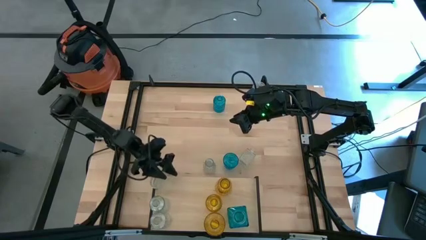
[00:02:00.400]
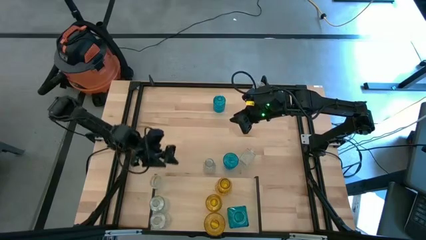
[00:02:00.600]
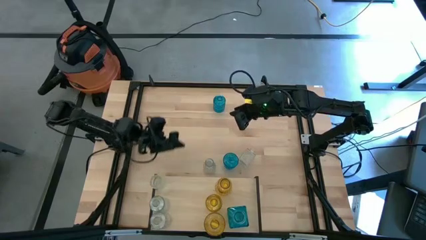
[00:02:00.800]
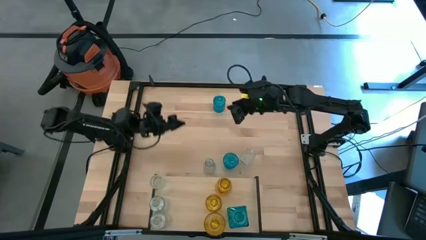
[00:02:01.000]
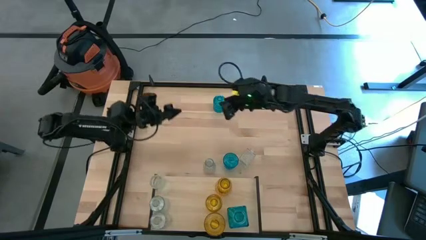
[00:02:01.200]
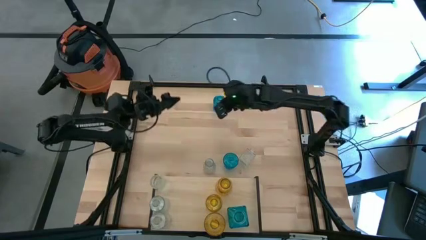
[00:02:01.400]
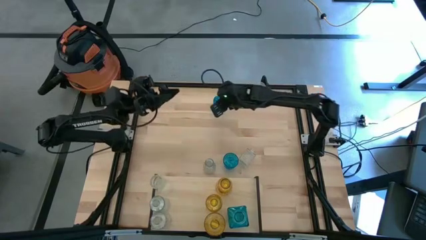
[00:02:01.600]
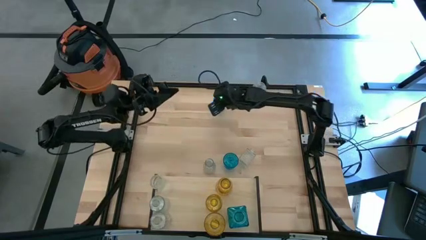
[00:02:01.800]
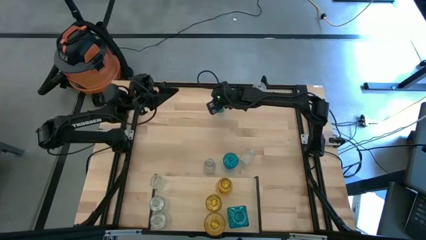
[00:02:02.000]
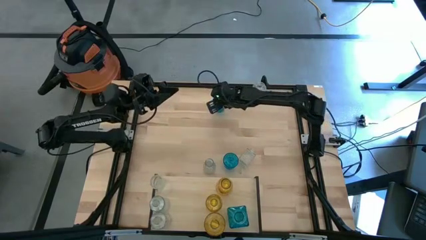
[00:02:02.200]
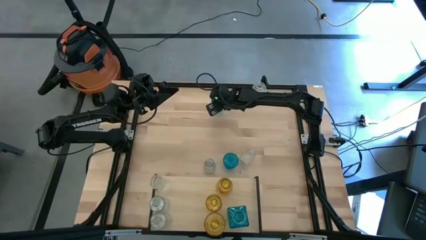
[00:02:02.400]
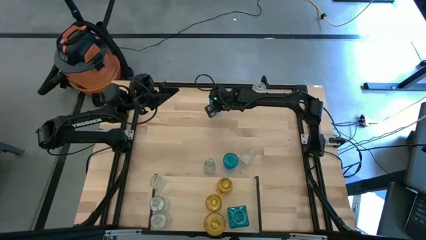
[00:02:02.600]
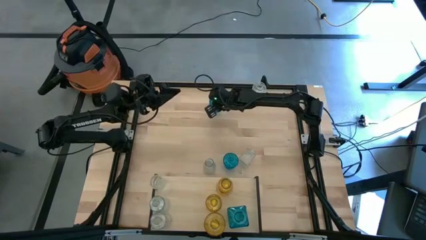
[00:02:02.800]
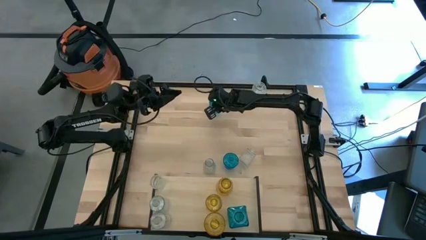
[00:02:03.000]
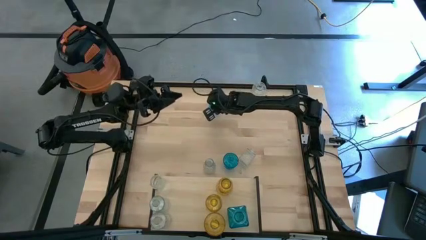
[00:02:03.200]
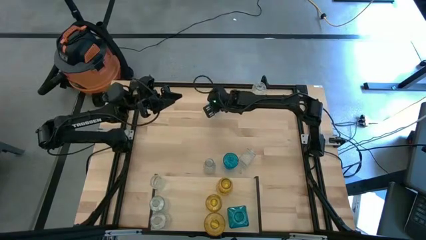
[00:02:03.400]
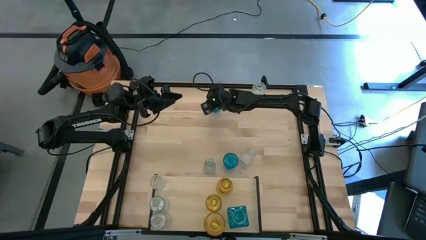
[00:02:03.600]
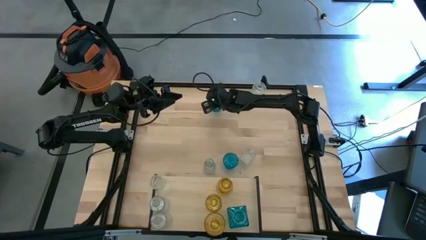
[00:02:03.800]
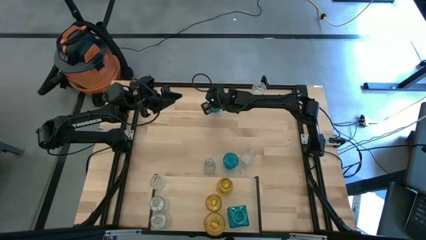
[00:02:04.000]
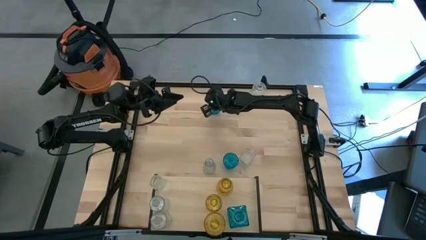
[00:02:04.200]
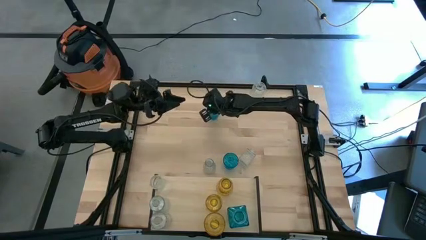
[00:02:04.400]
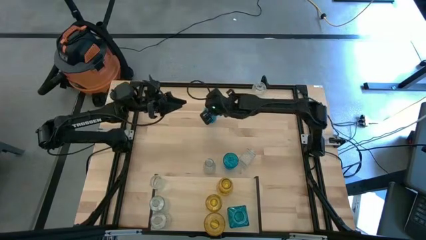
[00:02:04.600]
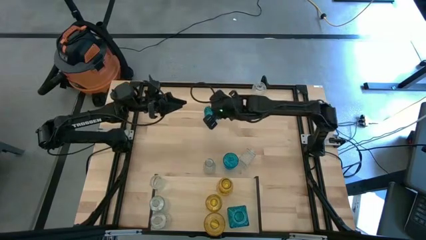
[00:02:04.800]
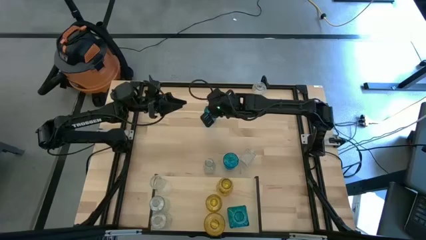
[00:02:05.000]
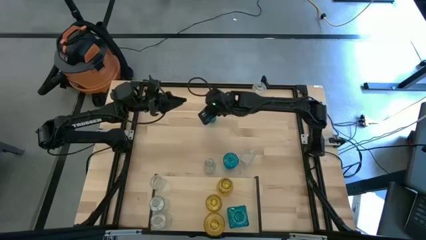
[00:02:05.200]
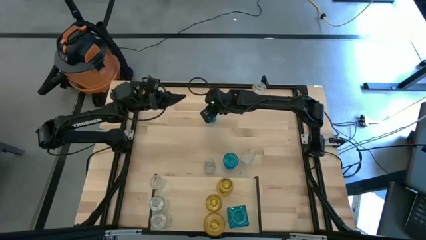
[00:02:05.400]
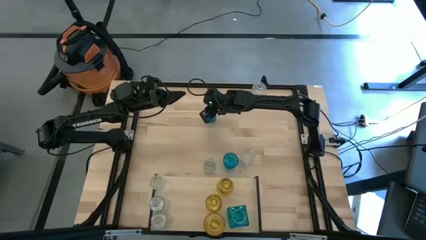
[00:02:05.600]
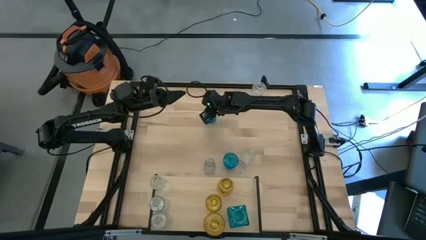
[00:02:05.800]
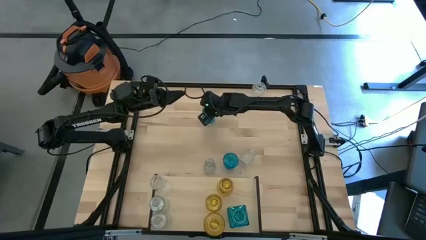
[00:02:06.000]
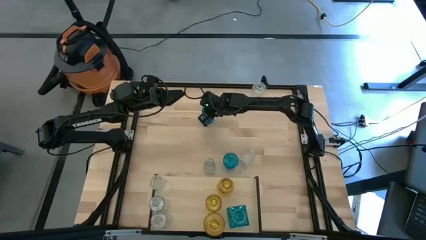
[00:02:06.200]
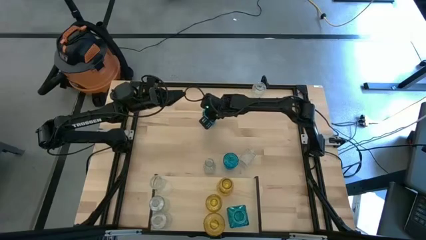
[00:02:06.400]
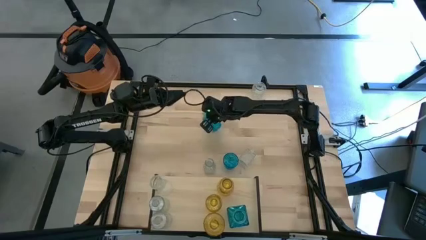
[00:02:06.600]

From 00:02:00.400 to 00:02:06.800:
Task: sort vases onto shelf
Put the blue vase on the shelf

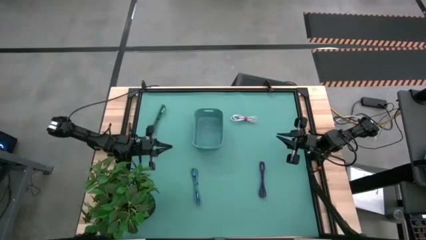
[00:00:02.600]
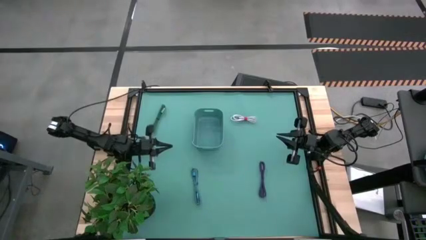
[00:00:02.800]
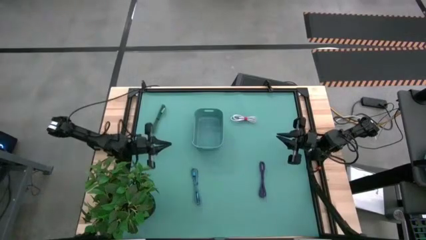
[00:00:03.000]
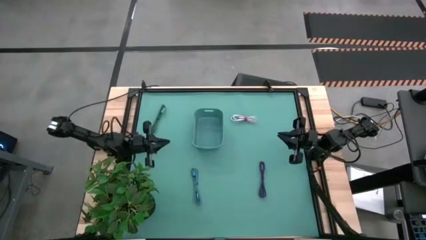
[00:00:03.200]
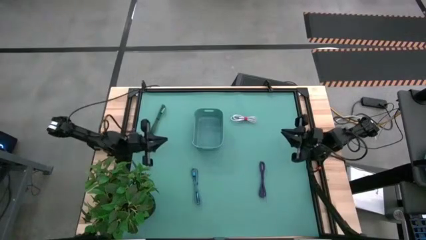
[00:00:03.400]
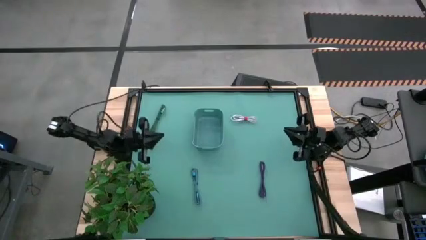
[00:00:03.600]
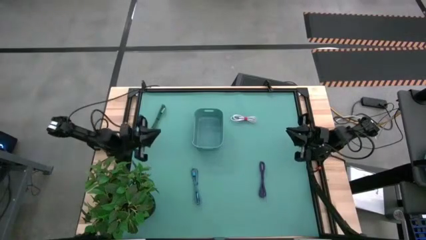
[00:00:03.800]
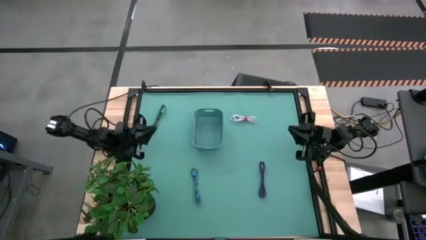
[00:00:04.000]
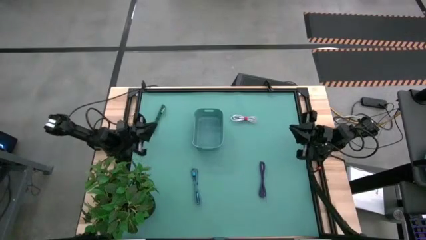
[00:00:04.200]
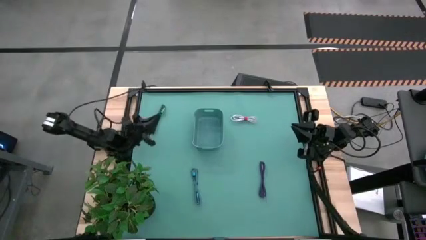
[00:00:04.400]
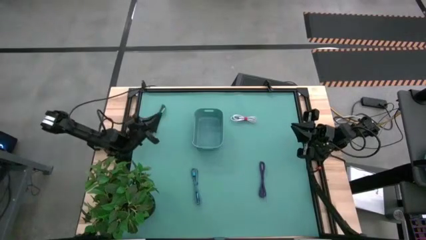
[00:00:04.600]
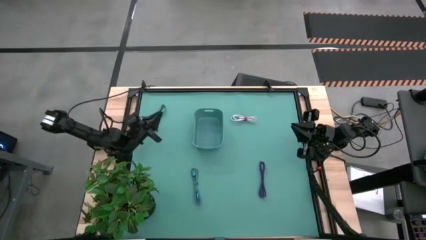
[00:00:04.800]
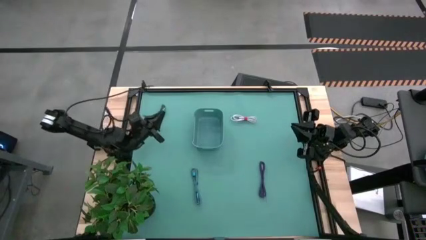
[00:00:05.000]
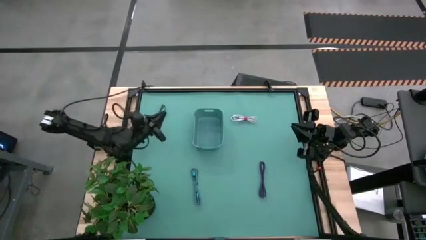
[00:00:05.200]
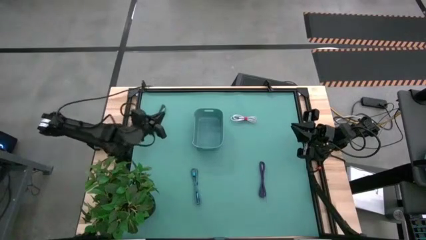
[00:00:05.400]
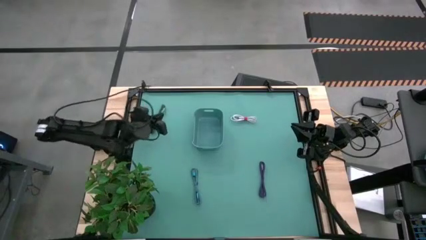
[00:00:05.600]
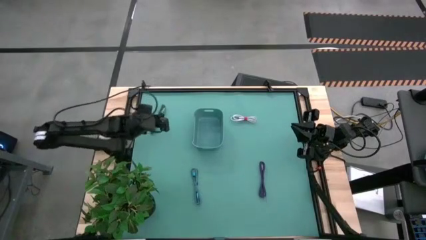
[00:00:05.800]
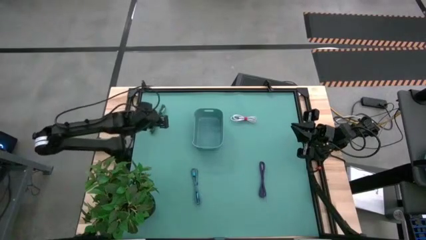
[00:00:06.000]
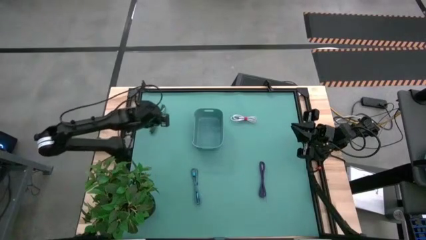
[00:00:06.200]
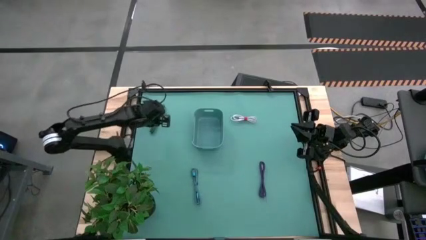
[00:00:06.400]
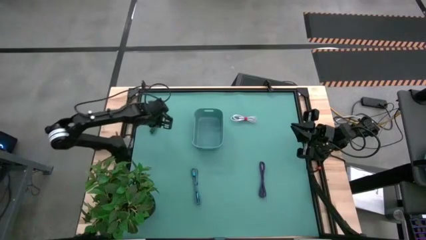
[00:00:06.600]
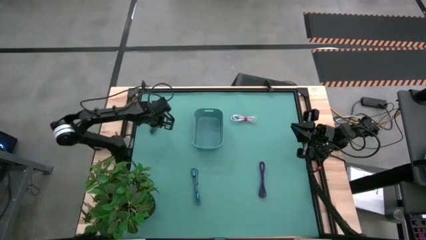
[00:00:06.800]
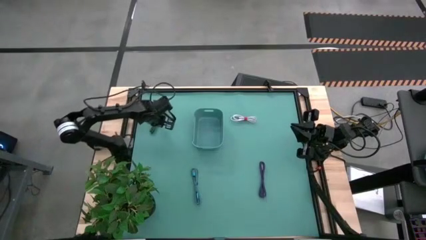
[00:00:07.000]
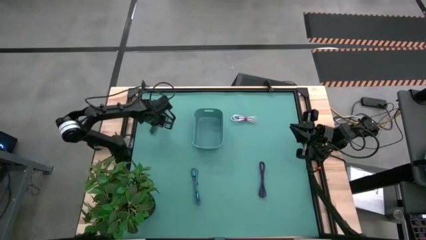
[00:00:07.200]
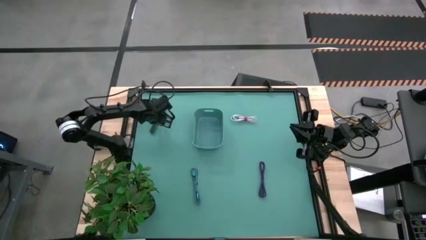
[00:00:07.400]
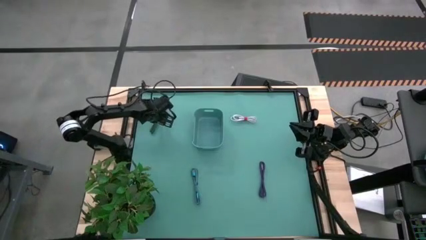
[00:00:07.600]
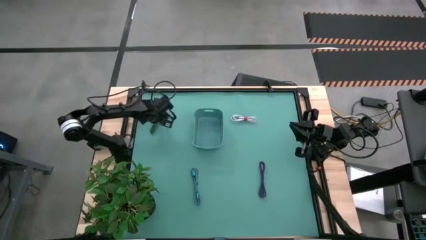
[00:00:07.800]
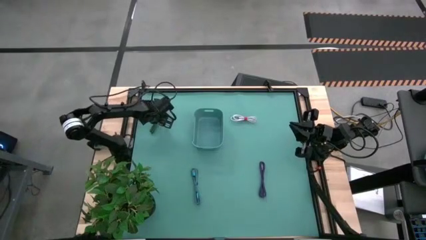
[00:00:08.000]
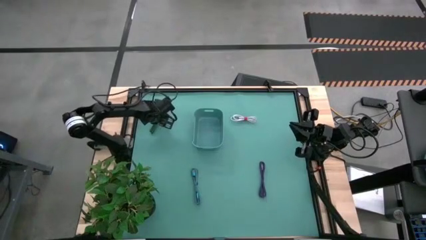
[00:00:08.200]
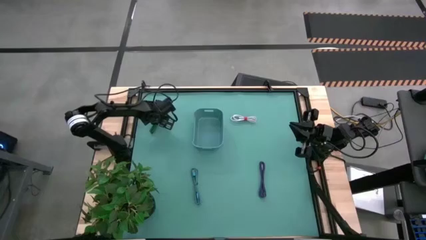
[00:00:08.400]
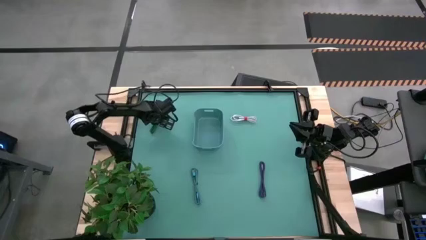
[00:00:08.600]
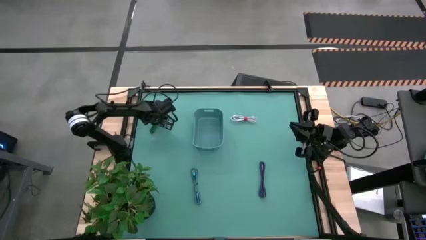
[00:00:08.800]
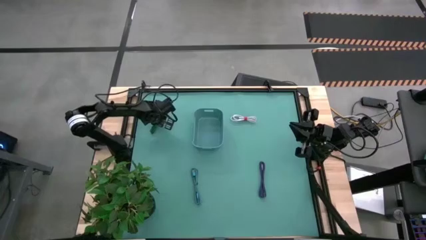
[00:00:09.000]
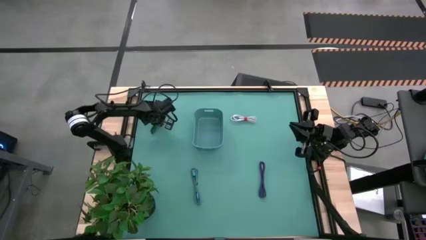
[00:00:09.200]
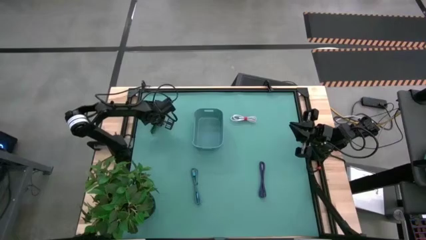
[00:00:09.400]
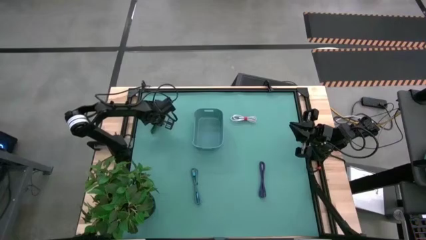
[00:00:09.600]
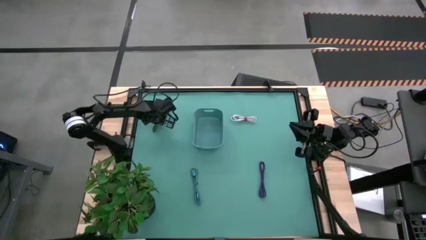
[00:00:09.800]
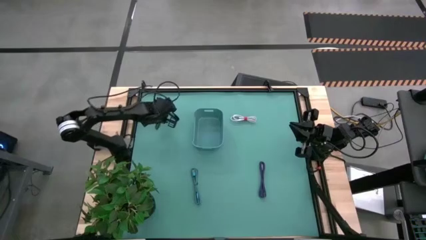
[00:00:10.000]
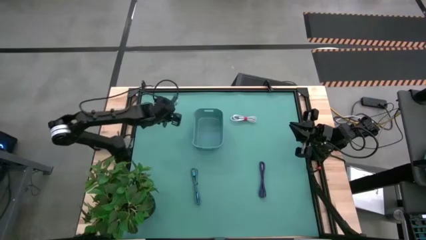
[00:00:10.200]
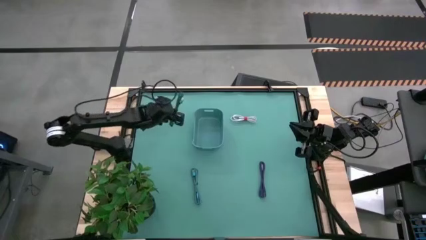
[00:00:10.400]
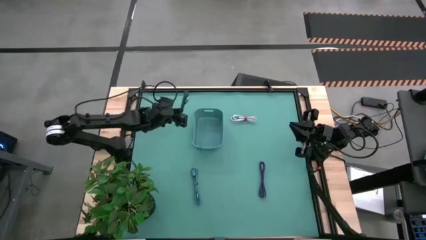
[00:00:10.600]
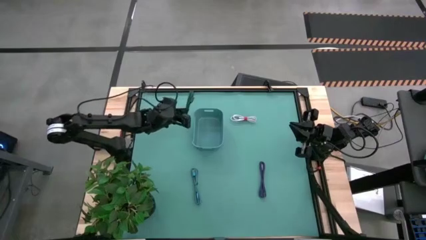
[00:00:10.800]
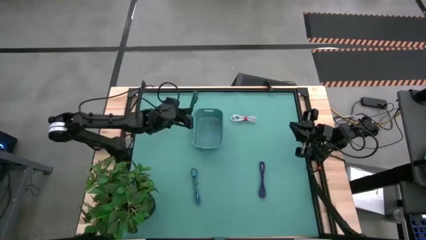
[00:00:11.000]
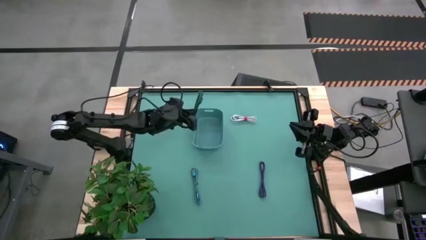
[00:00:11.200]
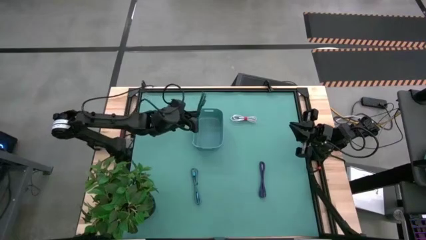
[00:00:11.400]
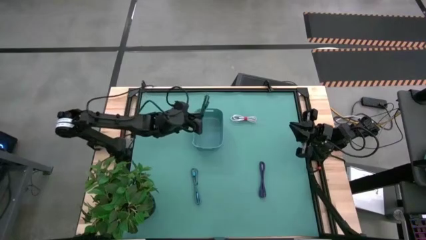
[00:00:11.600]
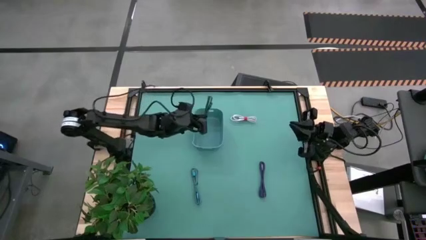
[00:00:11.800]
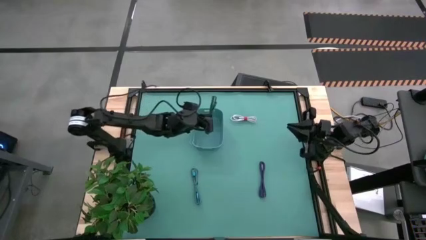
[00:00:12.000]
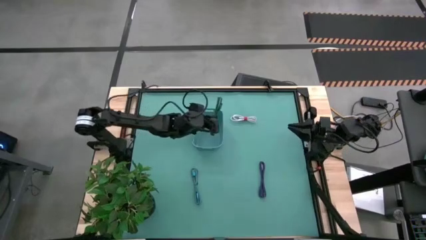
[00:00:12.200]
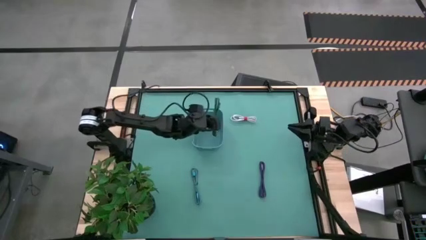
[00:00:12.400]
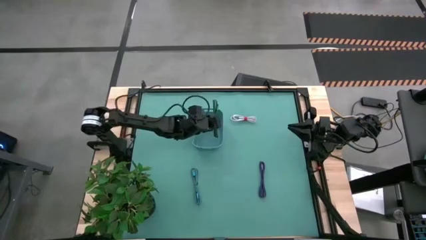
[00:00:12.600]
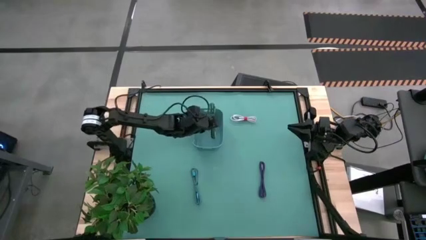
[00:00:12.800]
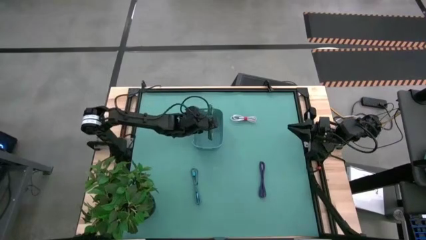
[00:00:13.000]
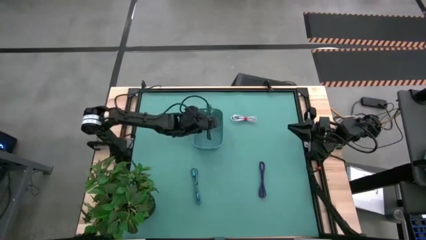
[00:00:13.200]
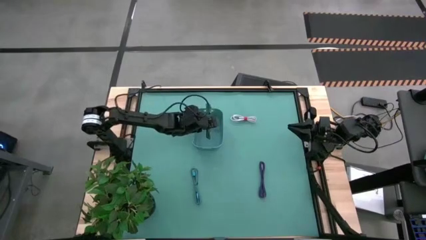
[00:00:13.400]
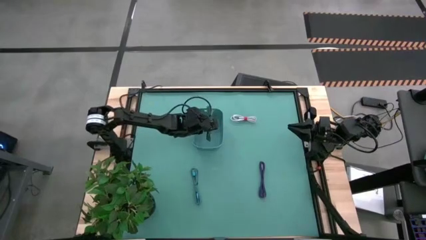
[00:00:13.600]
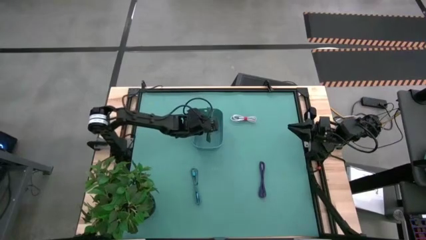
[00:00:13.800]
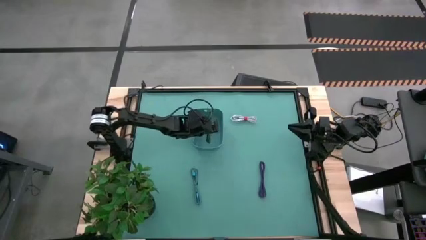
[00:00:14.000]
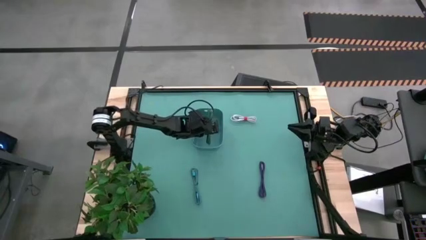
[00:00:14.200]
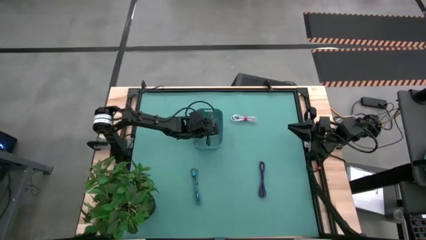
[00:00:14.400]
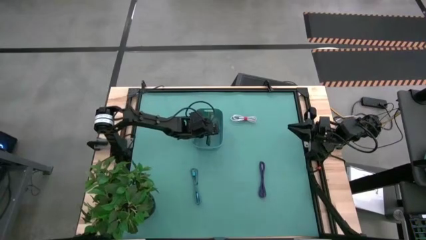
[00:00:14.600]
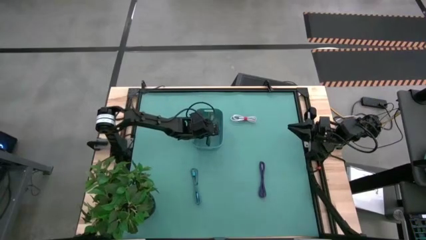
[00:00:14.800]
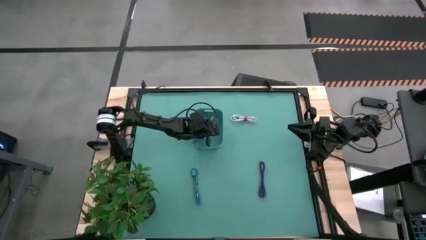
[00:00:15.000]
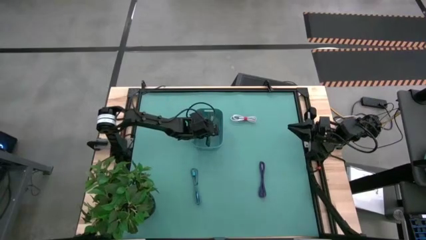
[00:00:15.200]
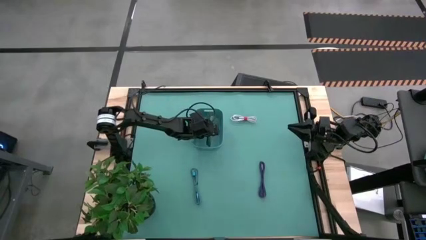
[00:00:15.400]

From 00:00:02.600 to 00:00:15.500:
Task: Pick and place USB-C Cables
Put the green black charger cable into the bin
